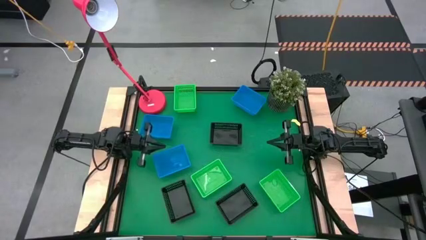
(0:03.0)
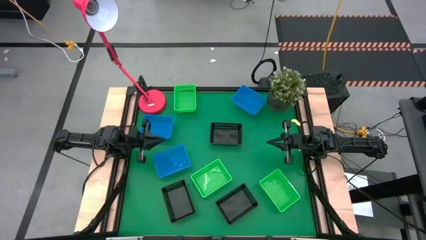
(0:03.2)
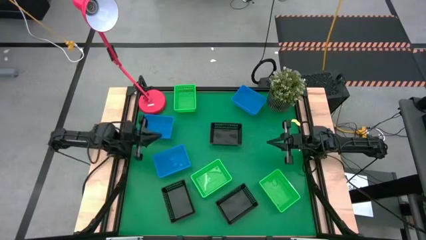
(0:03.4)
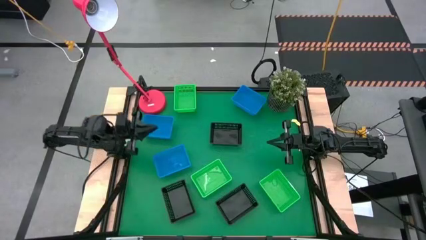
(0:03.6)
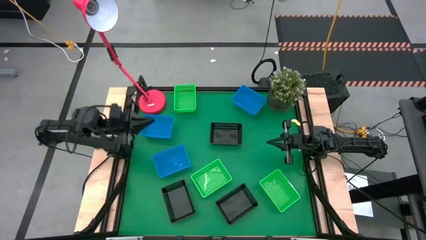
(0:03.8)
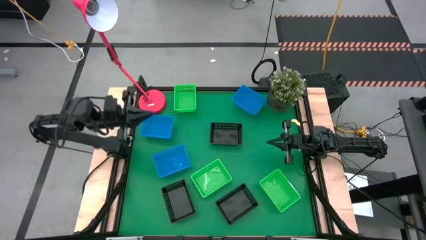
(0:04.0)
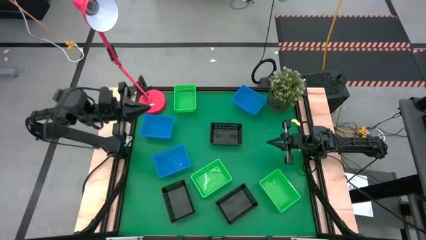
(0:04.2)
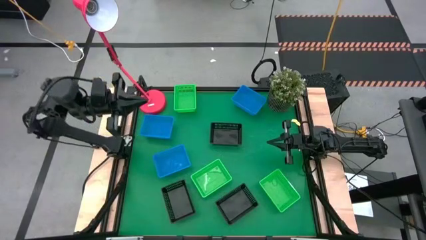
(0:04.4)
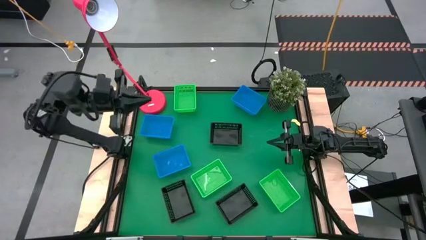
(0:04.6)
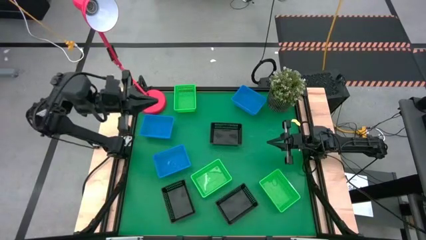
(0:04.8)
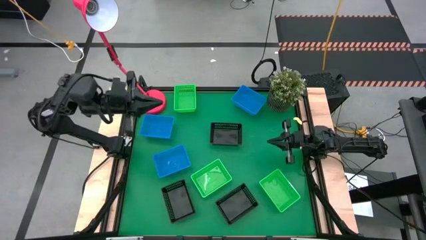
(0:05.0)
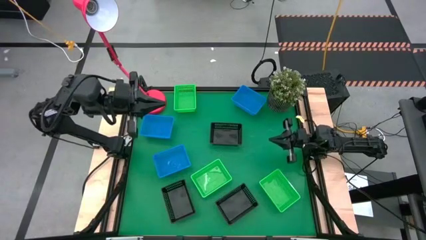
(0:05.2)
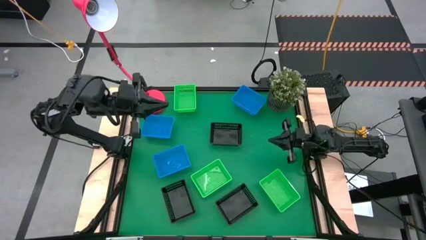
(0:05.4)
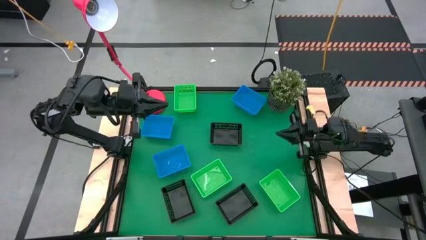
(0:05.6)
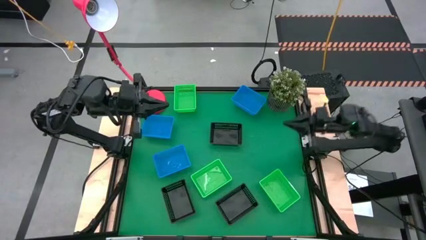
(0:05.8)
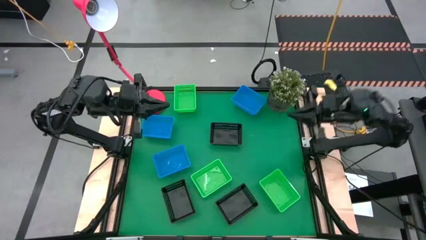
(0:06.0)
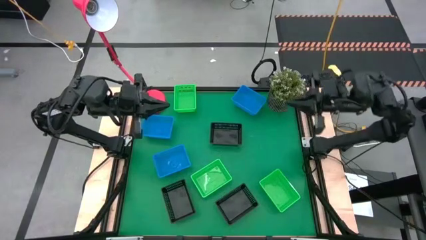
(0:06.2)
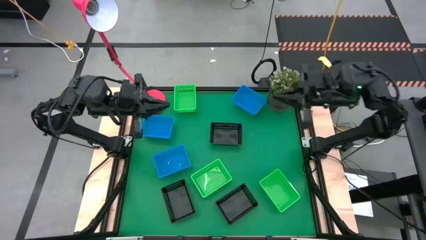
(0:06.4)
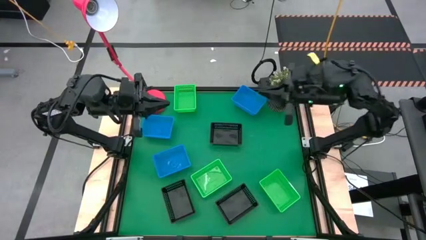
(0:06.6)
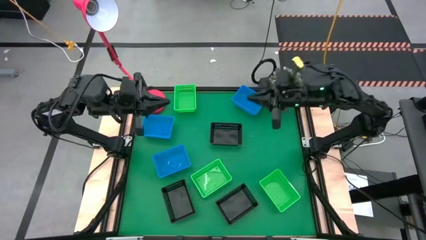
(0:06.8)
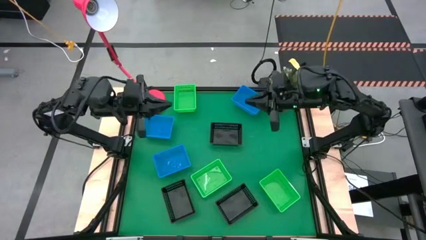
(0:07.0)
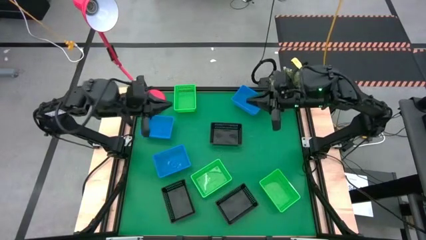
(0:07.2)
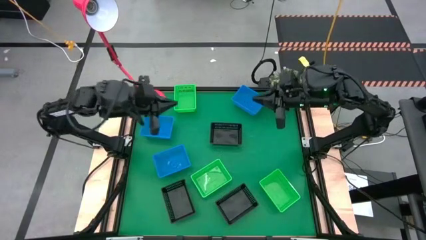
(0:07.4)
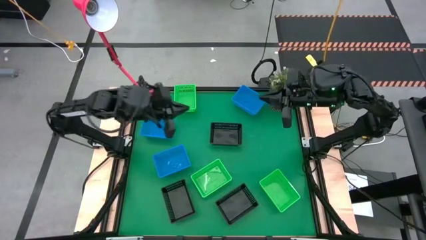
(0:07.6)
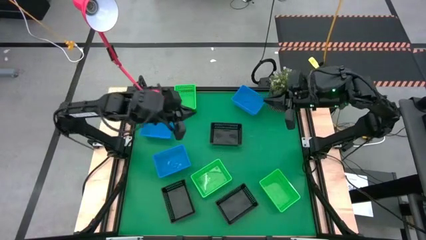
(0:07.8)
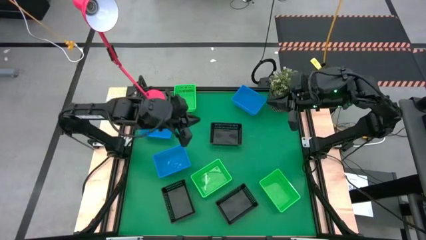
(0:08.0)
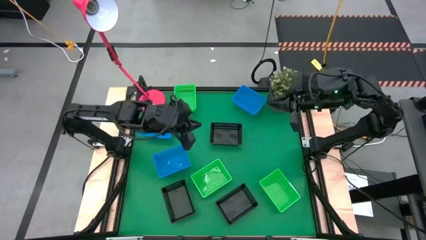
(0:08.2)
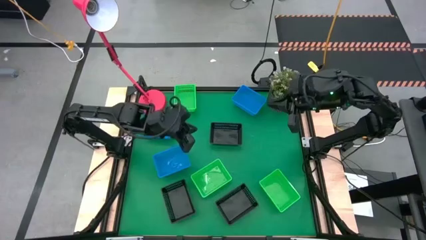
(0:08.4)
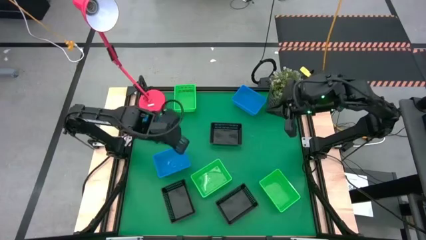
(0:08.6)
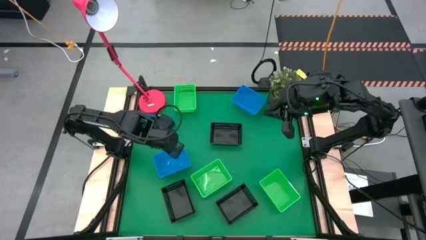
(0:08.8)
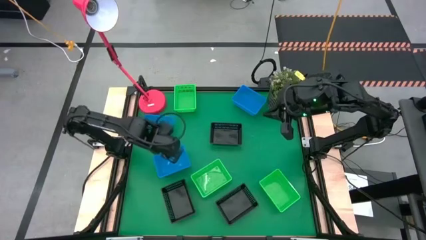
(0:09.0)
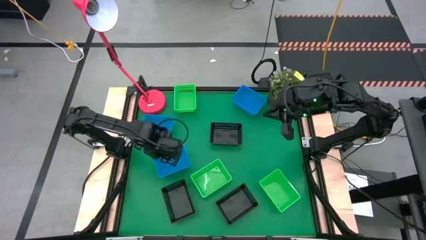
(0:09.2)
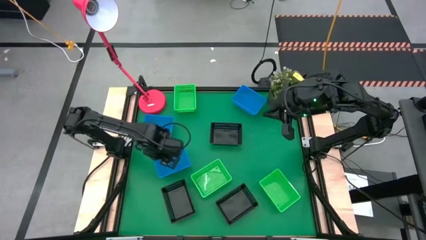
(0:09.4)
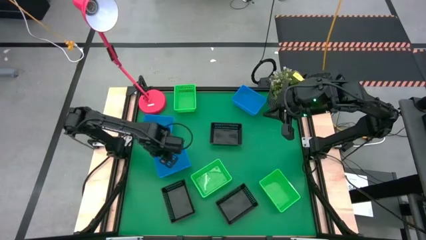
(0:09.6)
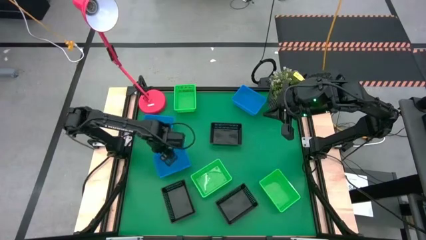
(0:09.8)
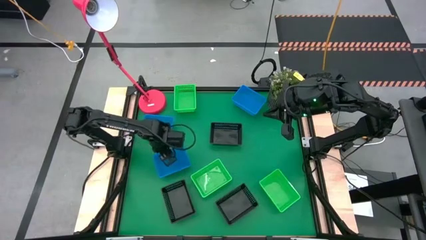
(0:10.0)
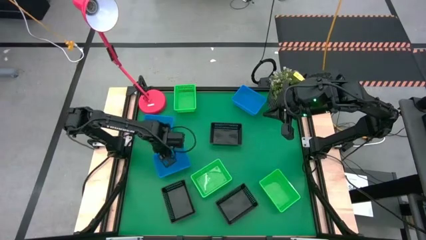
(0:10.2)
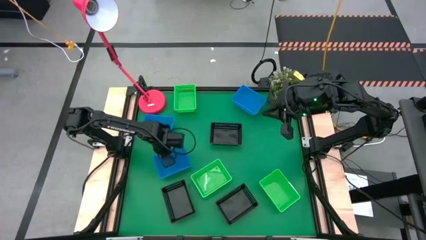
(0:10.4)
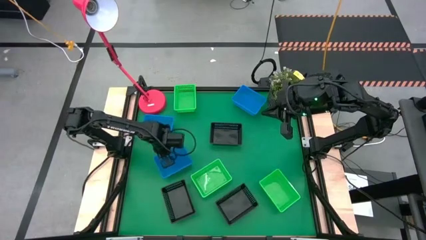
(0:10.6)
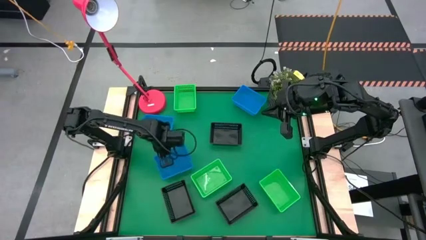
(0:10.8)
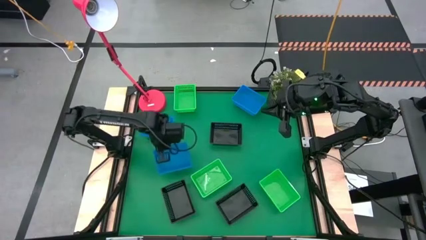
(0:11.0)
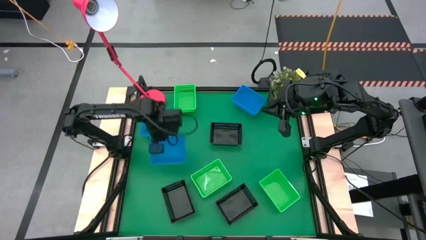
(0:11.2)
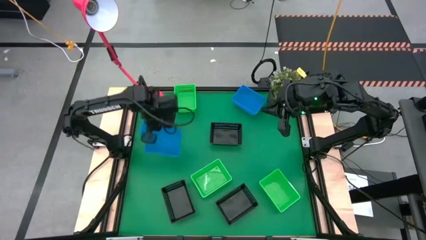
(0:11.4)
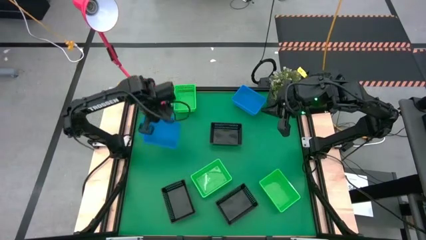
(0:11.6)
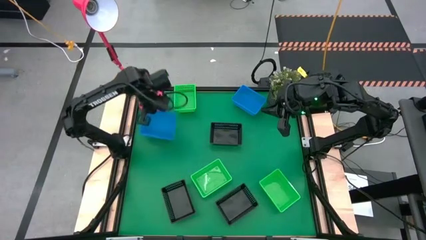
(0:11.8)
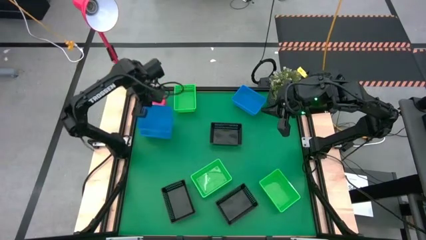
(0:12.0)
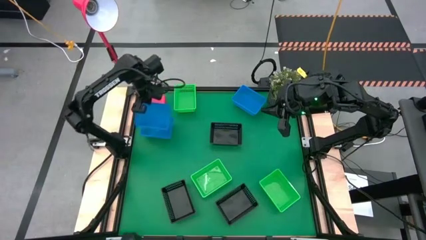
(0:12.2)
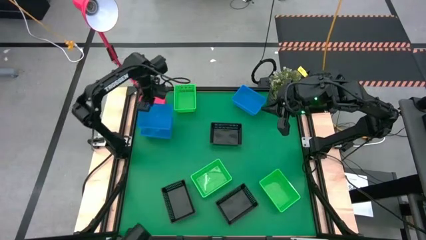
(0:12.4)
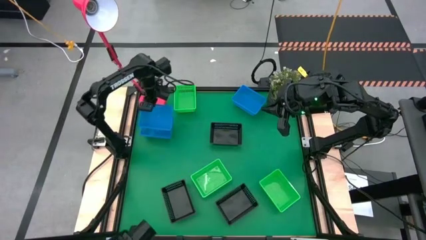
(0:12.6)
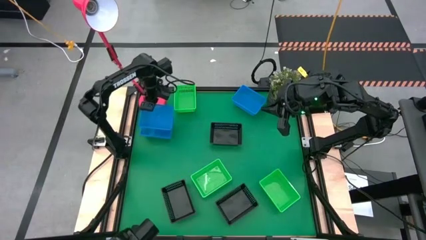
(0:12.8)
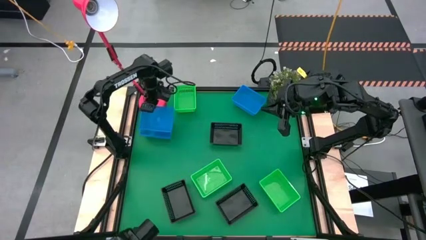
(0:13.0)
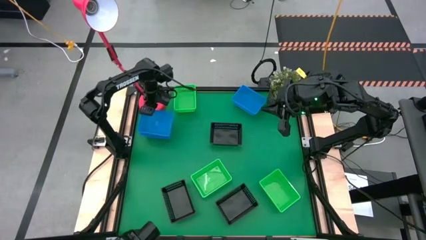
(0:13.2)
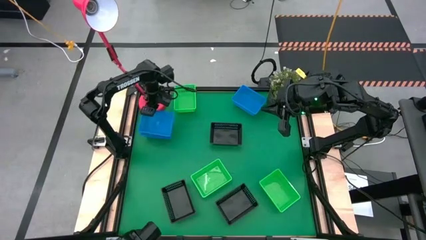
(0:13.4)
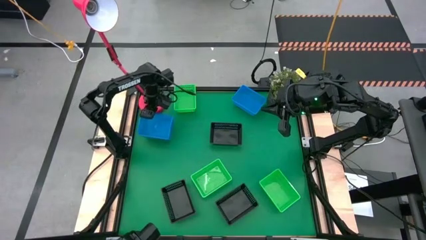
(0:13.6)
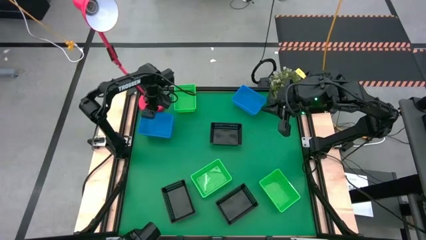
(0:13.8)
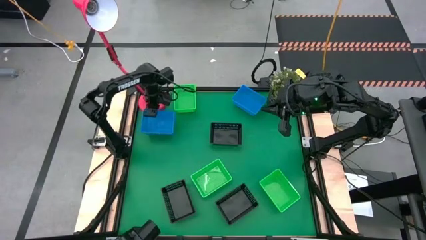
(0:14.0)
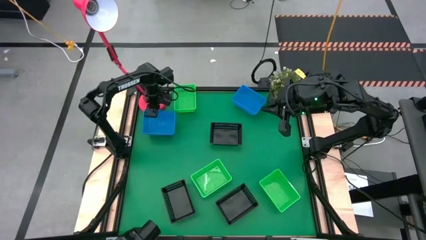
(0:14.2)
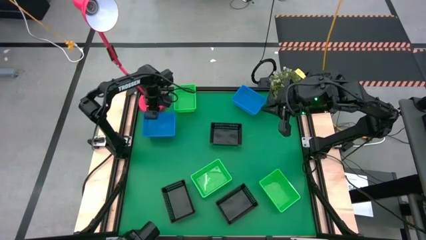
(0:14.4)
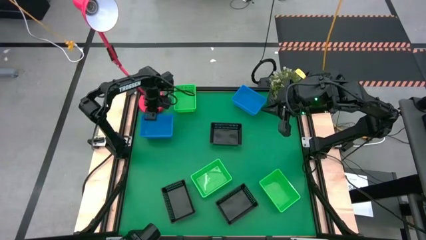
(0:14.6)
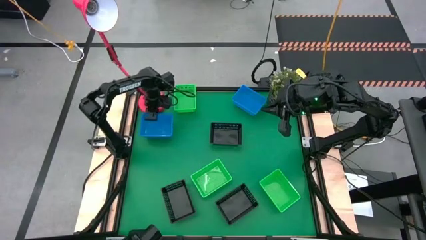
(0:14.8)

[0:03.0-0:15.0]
Stack the bottom blue bin on the middle left blue bin

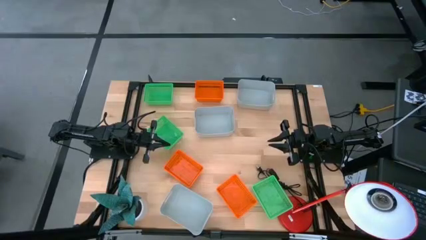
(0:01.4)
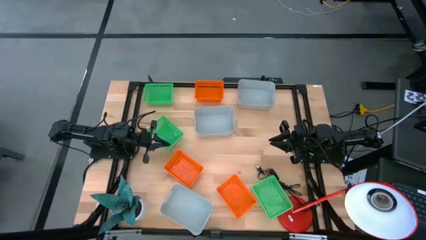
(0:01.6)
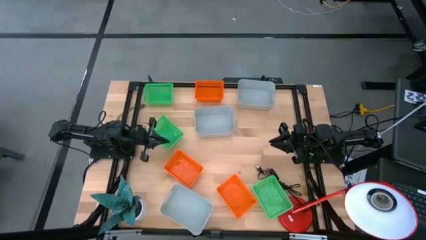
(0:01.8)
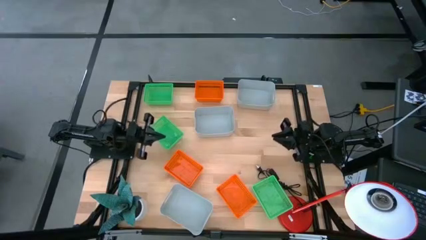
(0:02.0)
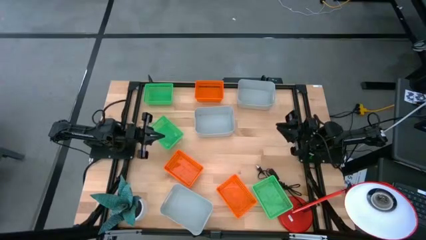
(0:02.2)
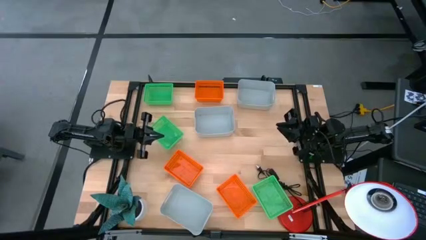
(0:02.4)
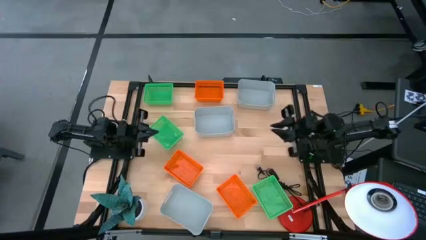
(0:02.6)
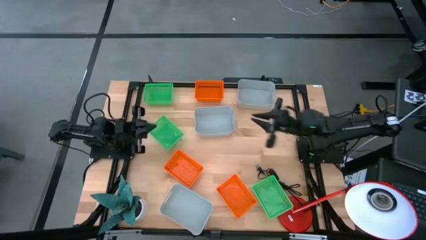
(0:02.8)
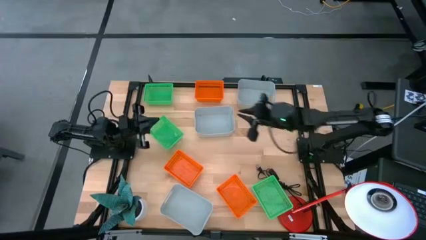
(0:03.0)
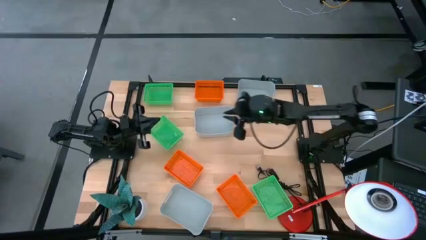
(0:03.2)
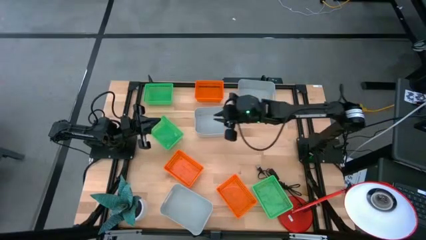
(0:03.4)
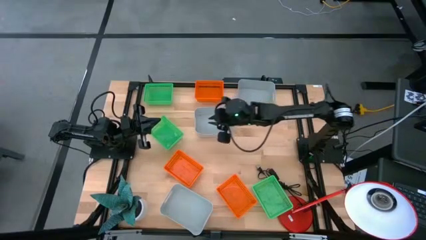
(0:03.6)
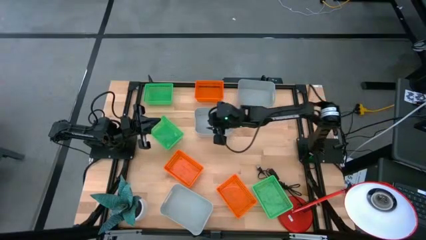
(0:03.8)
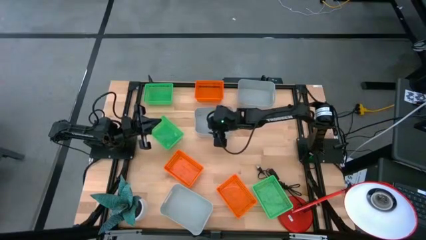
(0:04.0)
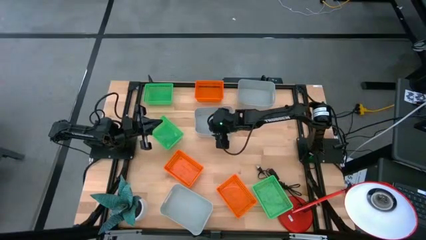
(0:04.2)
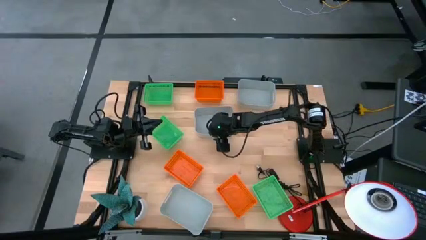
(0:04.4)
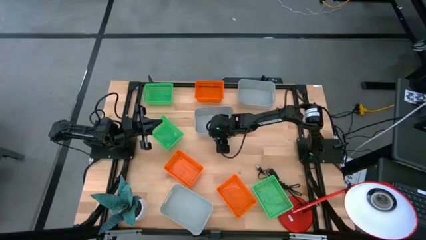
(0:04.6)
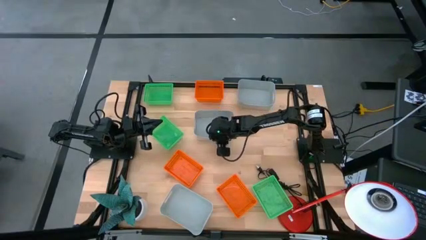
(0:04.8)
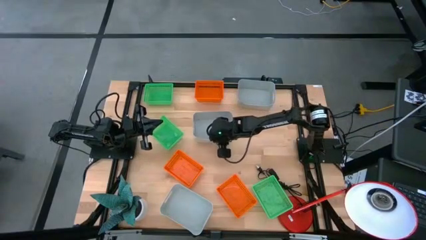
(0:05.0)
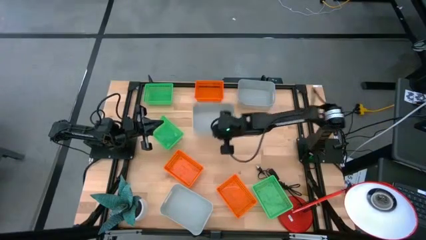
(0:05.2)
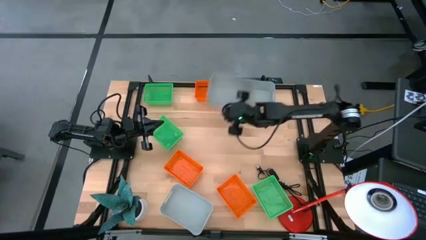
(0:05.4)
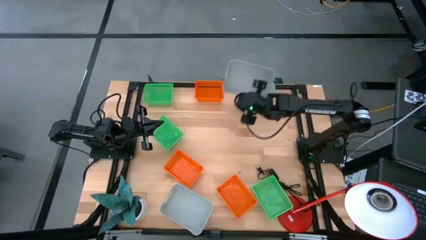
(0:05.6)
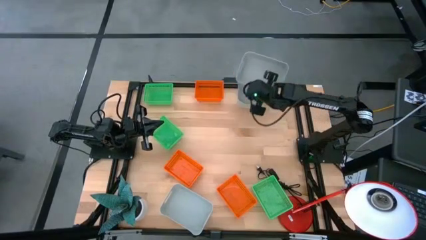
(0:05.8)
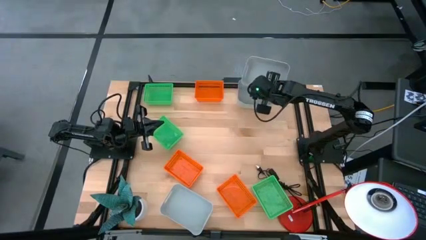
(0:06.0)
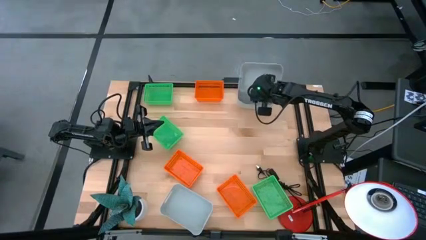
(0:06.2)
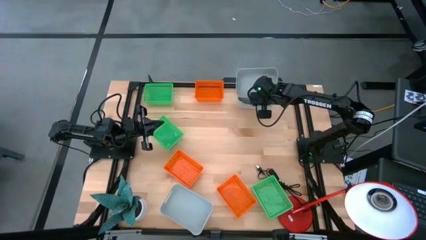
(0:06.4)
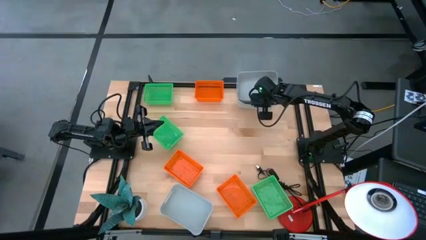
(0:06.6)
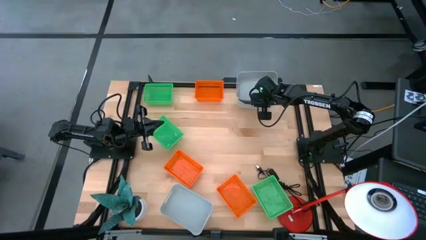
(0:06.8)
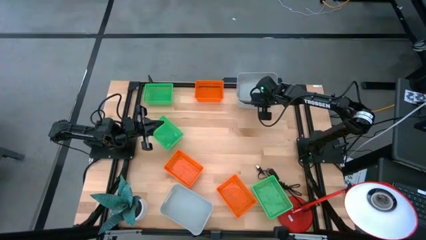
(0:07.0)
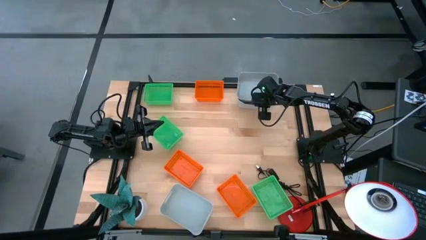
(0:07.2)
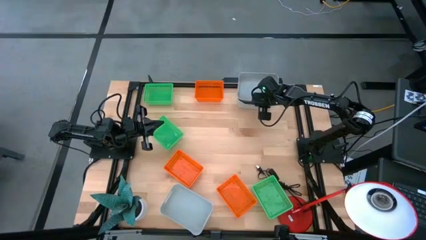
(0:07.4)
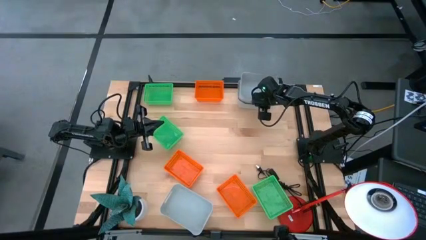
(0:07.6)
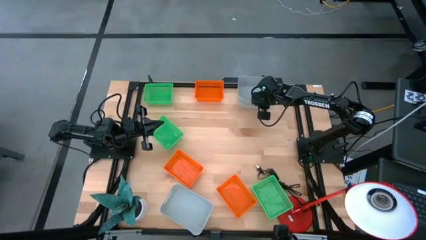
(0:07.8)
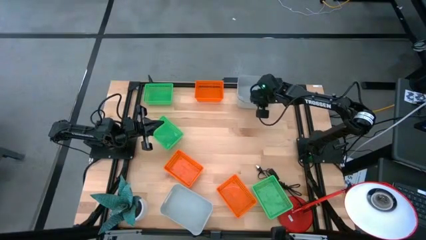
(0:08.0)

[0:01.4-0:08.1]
Stack the middle gray bin on top of the top gray bin
